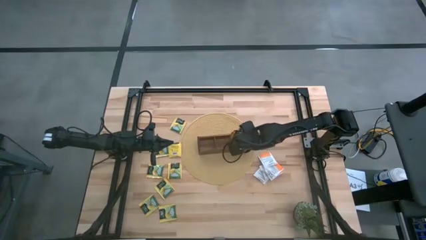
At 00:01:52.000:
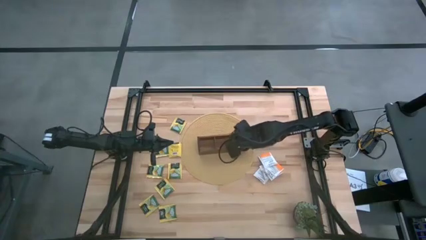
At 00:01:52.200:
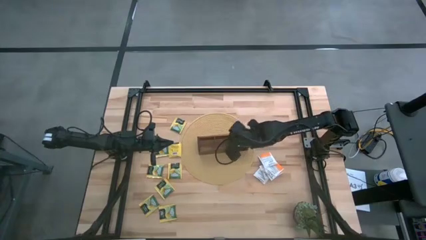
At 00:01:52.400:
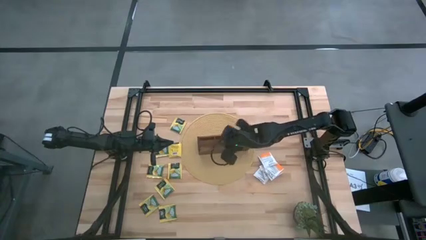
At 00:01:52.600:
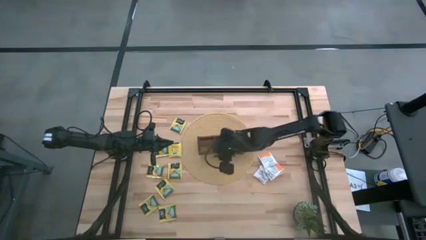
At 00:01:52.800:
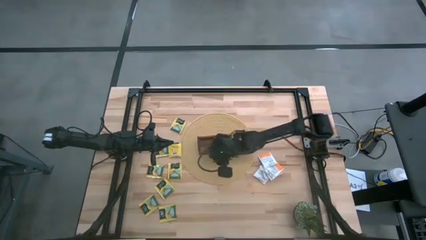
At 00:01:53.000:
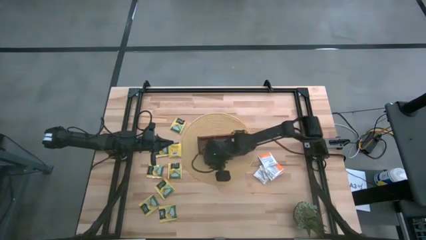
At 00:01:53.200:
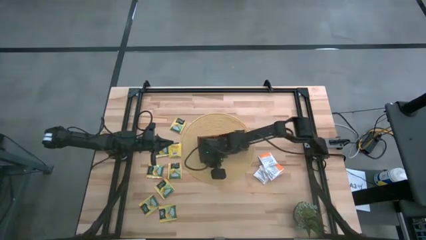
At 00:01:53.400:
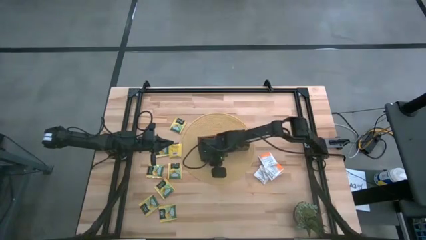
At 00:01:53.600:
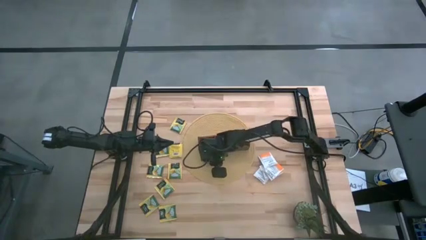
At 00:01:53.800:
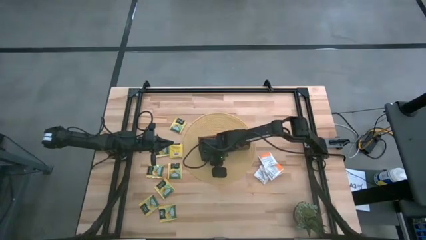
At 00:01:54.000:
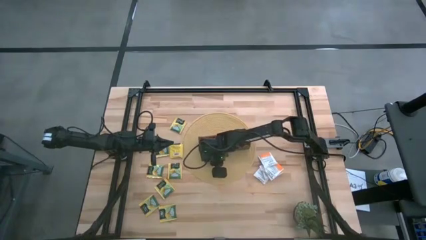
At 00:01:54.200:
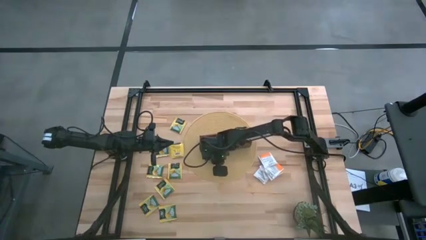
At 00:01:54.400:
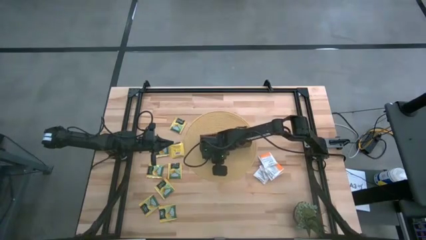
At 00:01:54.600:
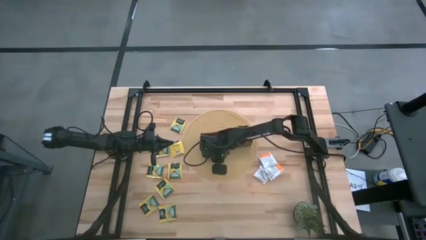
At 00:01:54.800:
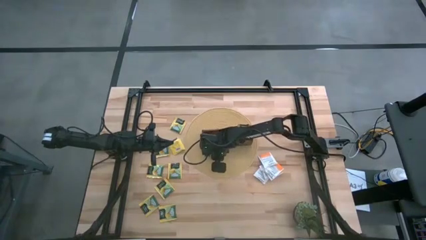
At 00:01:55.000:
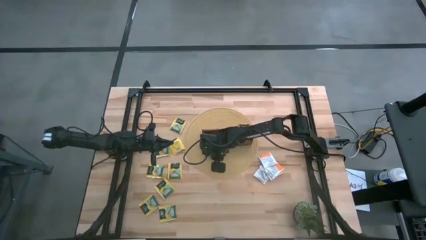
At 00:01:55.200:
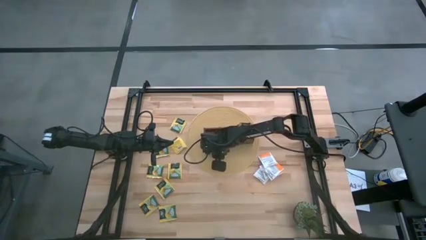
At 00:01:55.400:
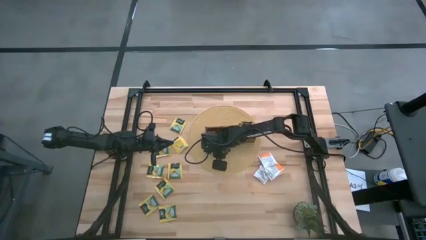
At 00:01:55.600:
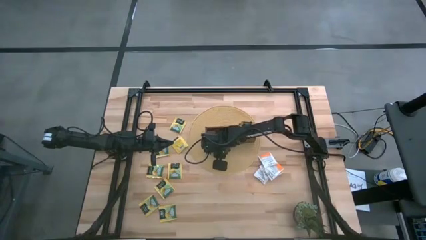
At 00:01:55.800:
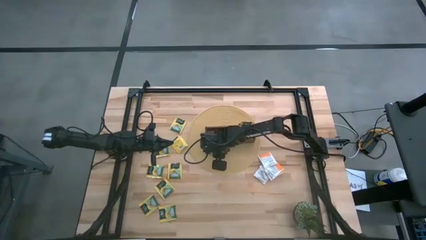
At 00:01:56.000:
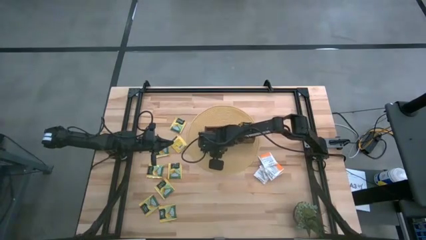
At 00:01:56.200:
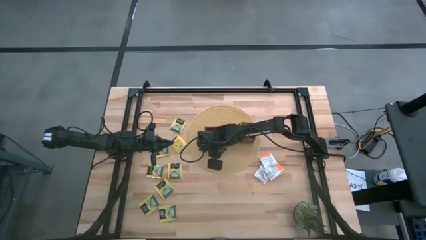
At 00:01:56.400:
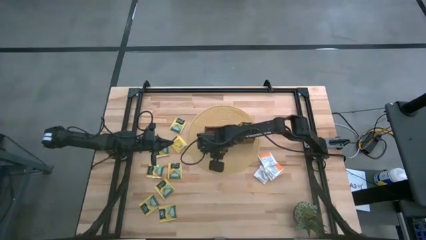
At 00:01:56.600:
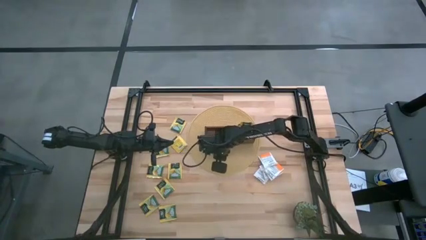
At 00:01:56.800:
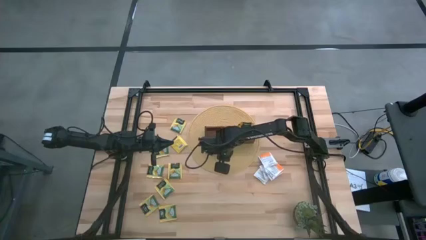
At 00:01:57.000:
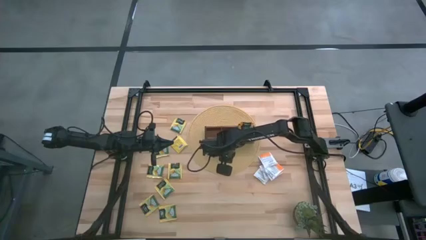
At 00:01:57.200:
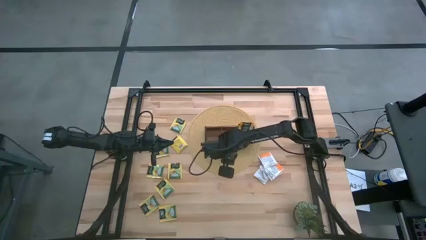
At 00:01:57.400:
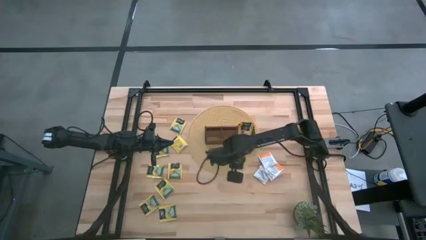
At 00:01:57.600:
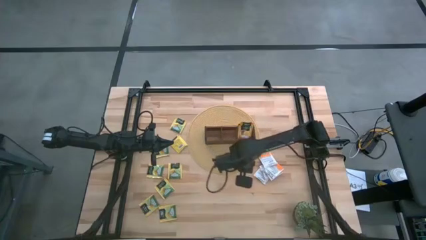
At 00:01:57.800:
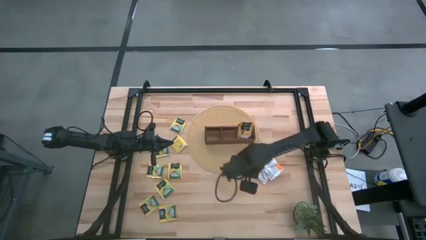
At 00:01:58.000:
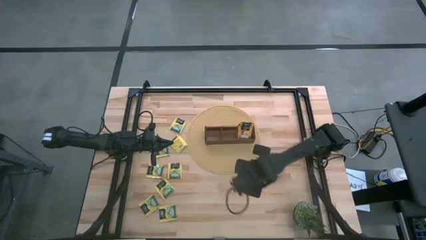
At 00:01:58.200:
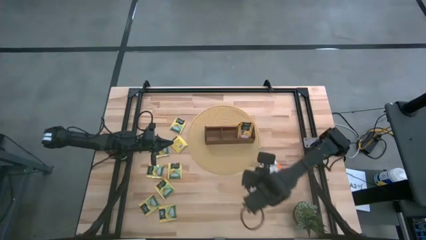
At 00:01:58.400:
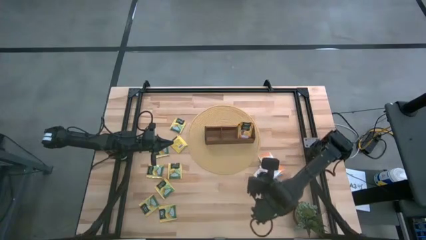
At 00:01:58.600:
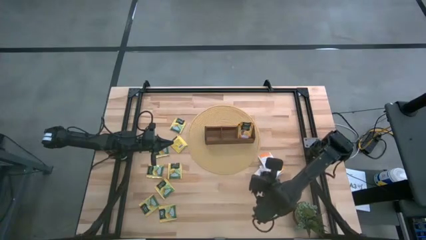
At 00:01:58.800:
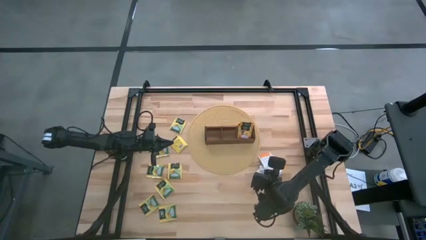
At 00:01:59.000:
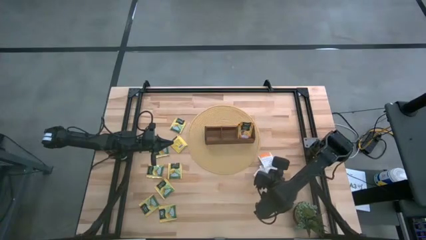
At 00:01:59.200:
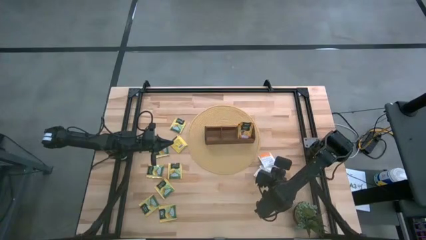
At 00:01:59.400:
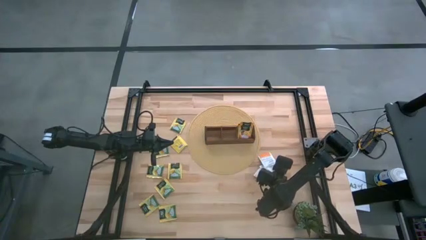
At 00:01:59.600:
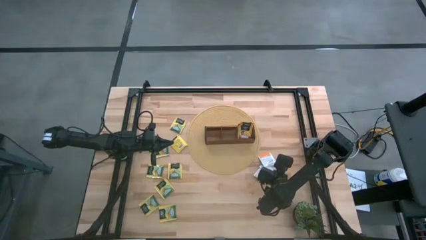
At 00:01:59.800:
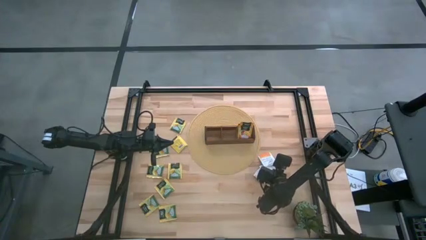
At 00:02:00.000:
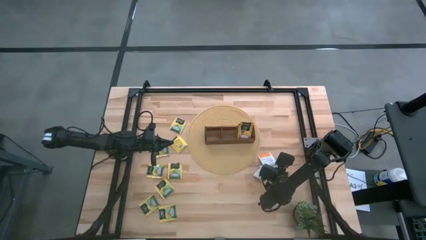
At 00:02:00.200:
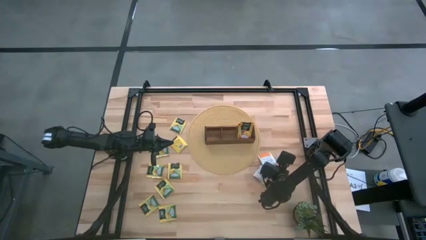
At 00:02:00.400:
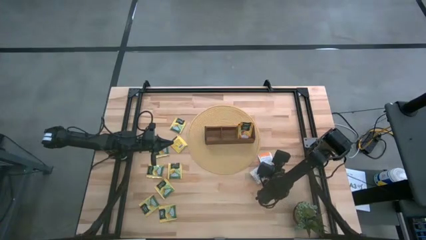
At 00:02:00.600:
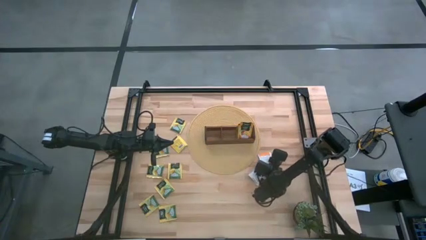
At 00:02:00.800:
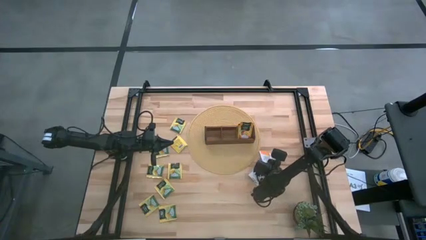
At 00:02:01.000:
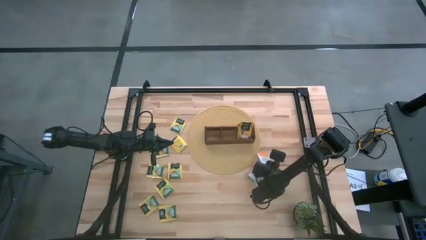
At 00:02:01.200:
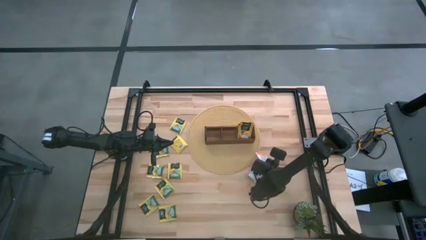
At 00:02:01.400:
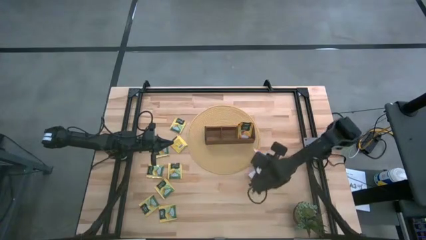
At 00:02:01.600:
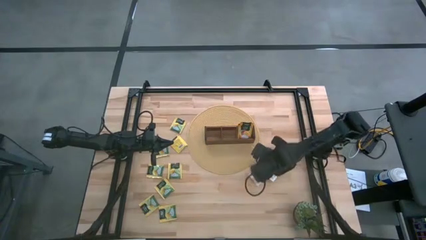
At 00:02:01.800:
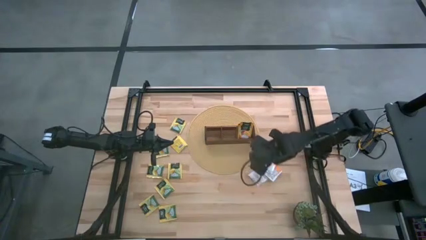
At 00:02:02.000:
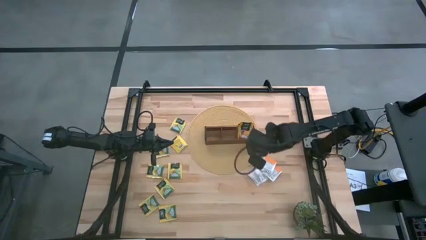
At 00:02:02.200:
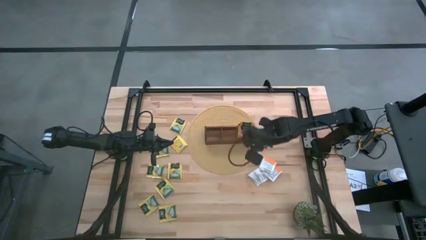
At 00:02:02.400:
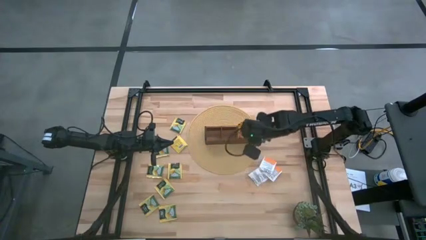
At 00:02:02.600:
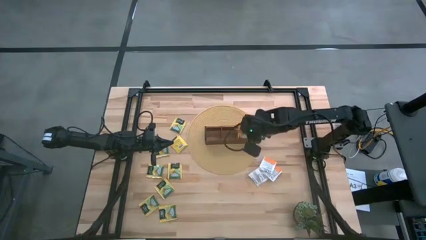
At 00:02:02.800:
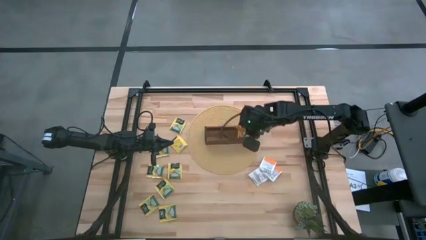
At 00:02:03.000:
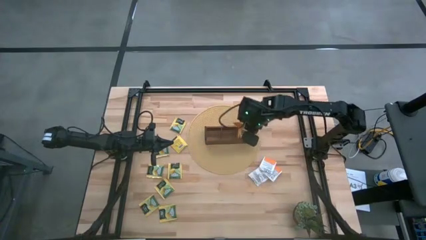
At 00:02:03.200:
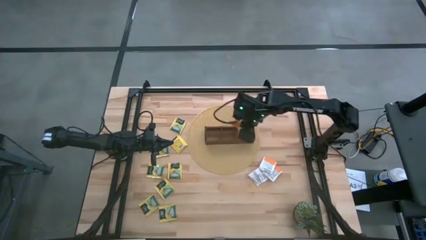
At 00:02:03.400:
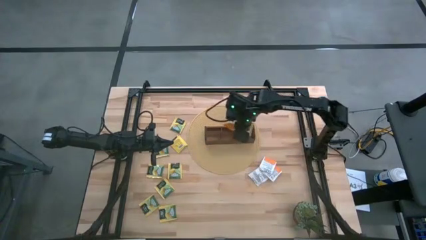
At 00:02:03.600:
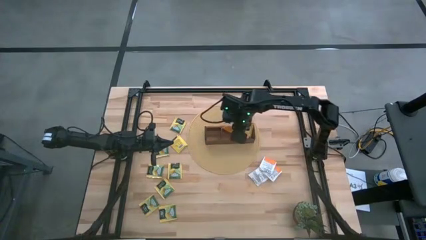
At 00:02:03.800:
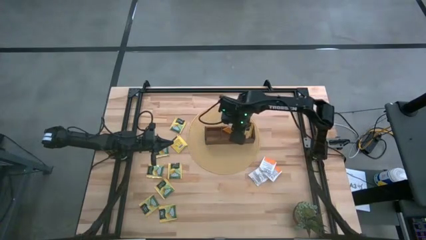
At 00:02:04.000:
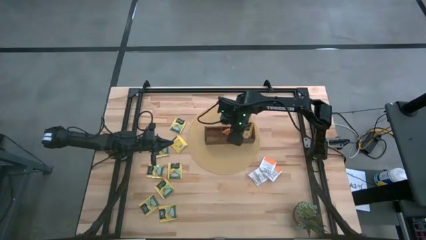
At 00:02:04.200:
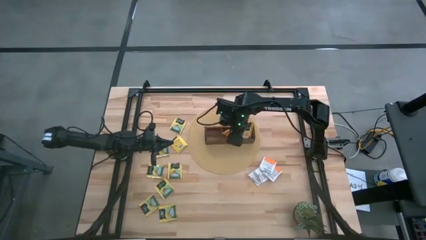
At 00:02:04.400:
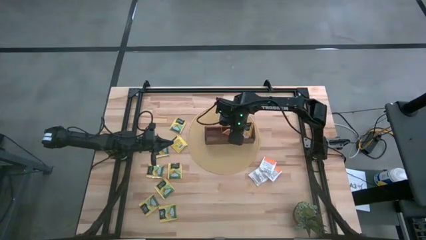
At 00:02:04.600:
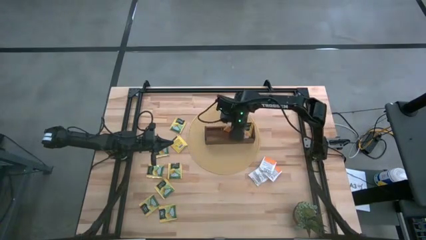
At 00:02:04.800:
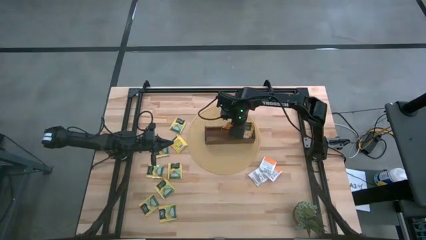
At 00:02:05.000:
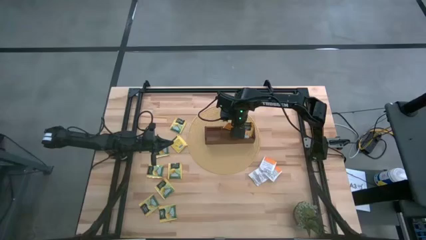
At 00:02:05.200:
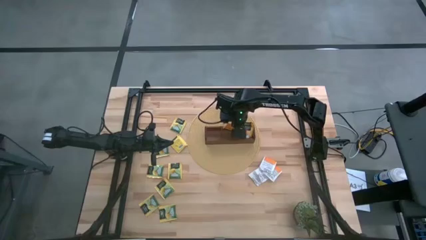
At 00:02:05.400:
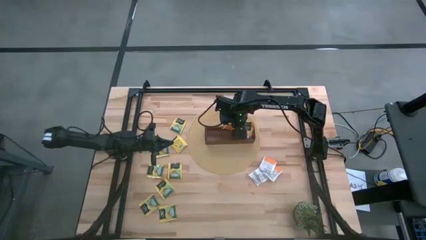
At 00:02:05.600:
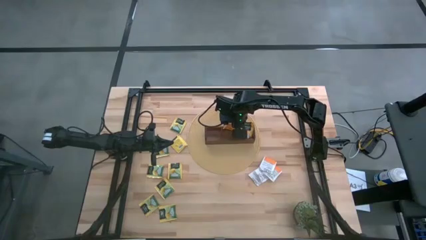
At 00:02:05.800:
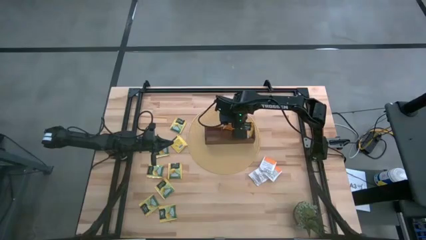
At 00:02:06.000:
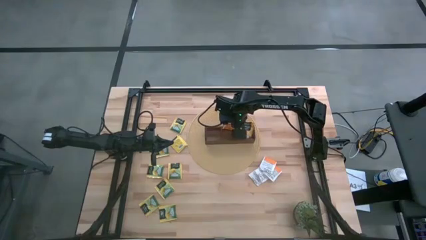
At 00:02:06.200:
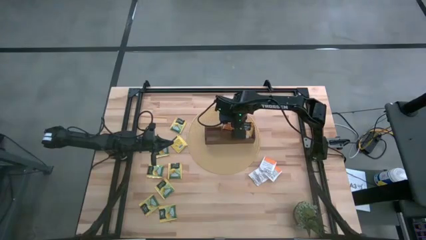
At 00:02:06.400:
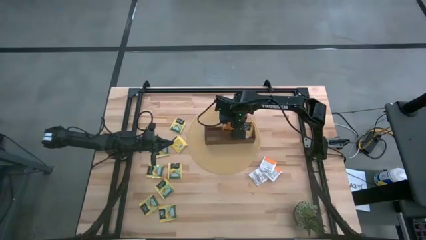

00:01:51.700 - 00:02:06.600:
Task: Pick & Place Tea
Put the white tea bag into the middle section of the wooden organizer
